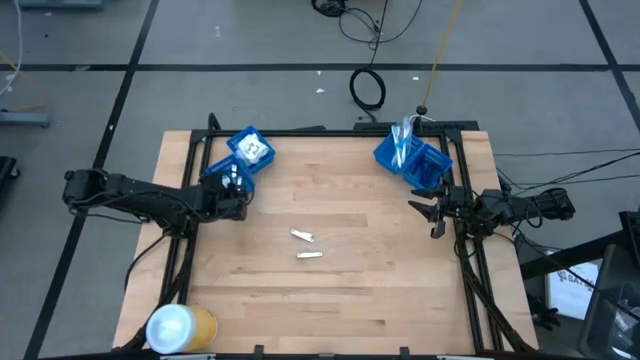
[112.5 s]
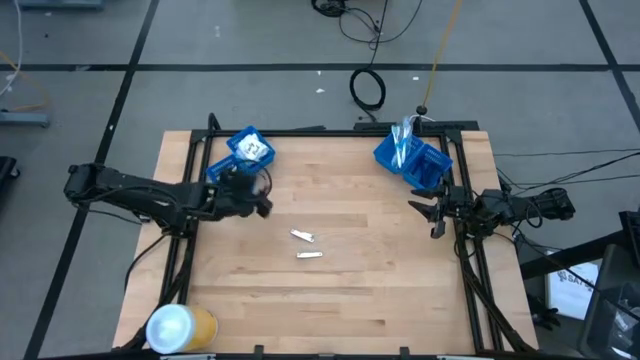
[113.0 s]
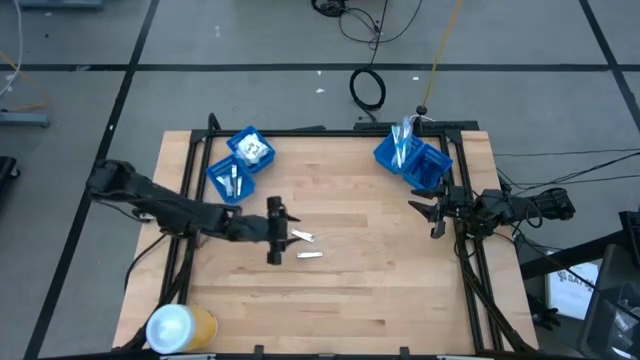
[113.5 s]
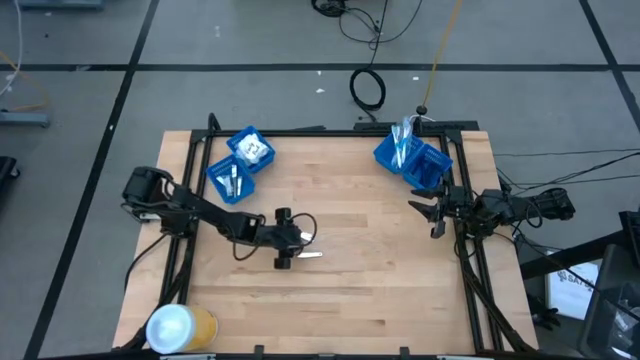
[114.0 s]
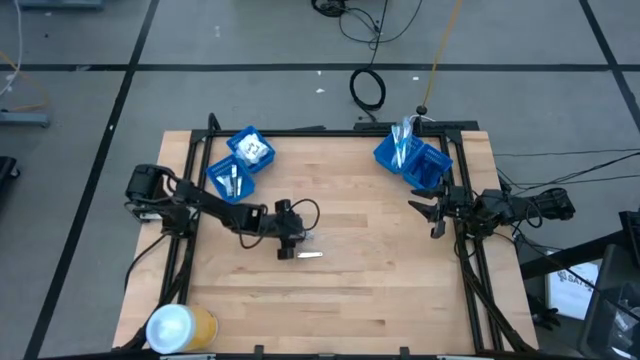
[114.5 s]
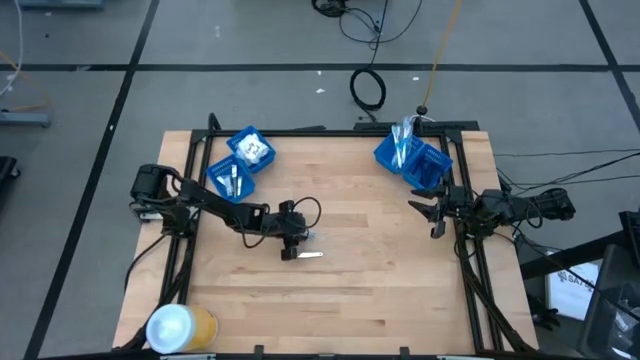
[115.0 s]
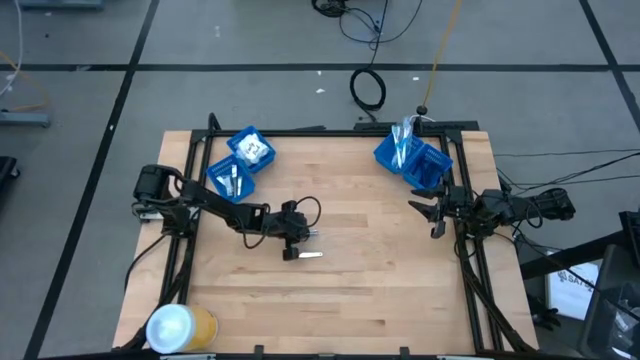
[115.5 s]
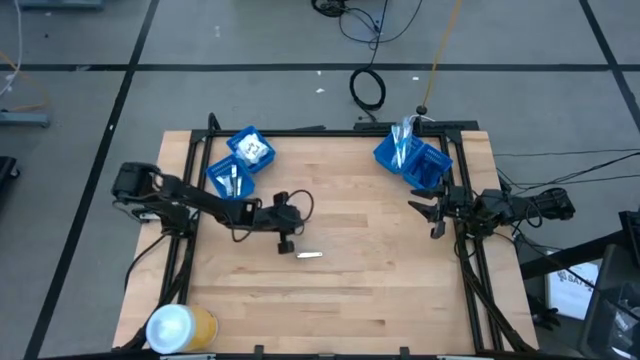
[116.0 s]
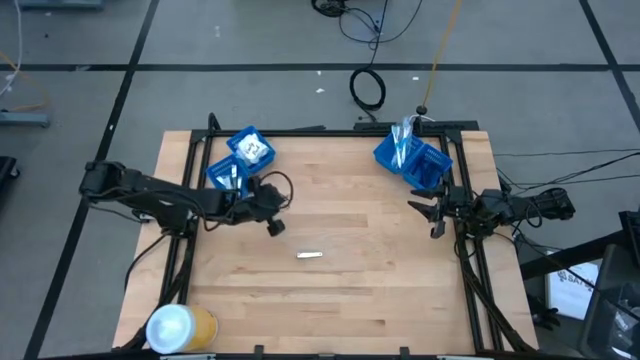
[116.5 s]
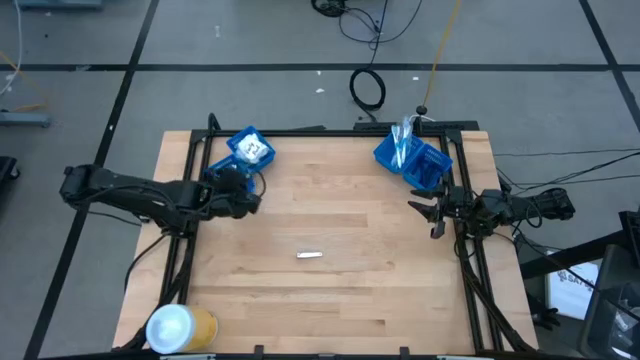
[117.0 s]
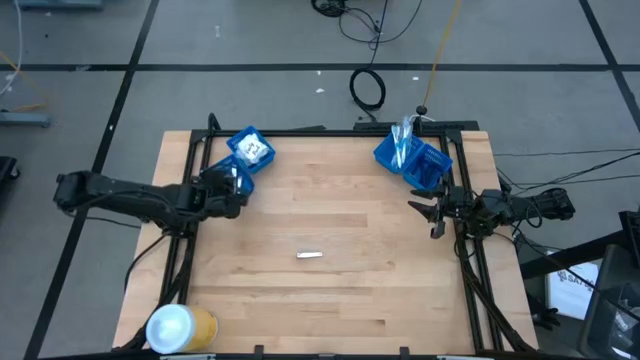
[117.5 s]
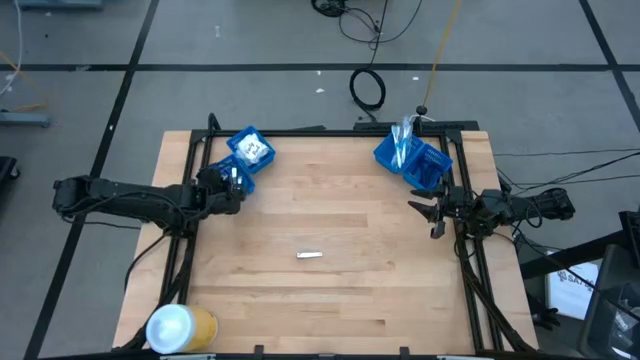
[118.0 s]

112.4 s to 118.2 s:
Task: Pick & Place Travel size toiletries
Put the silver nail cutter into the left blue basket

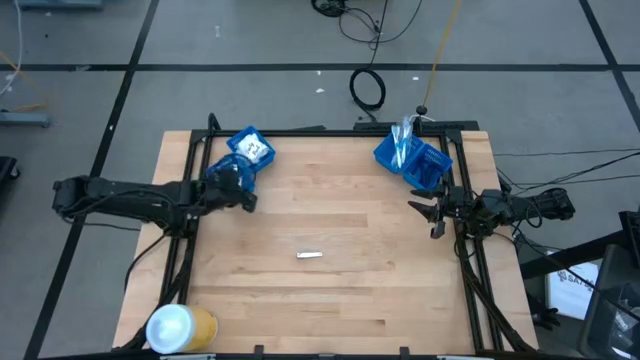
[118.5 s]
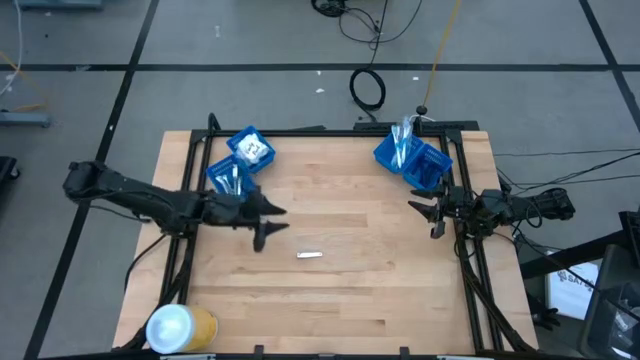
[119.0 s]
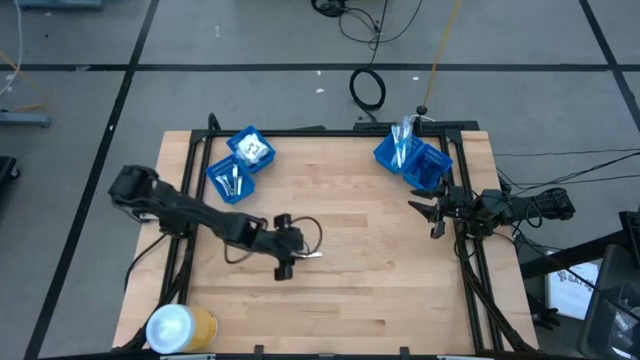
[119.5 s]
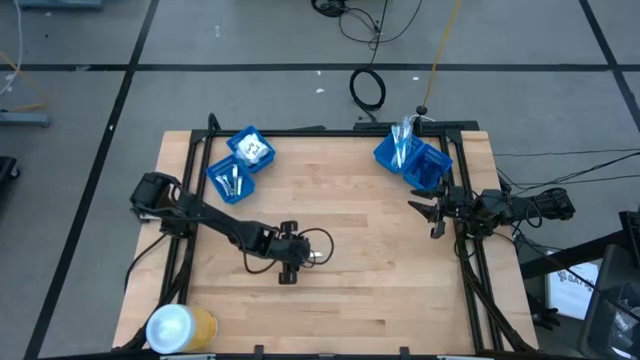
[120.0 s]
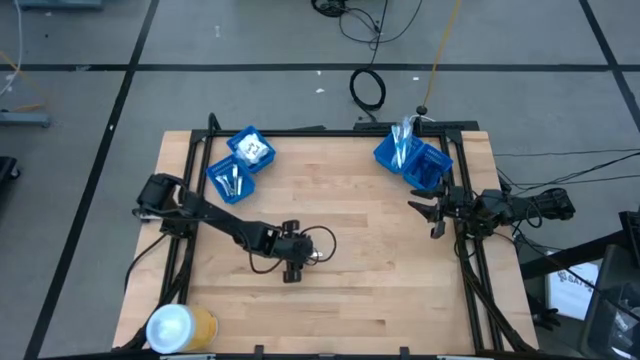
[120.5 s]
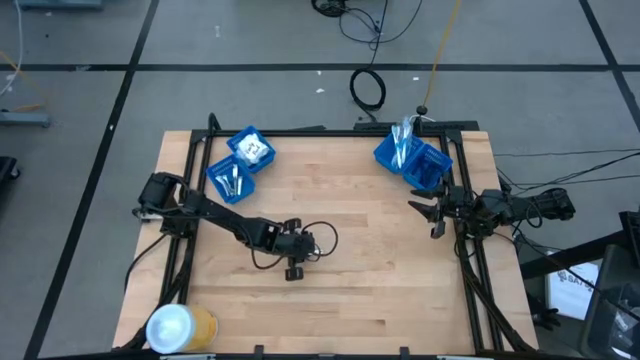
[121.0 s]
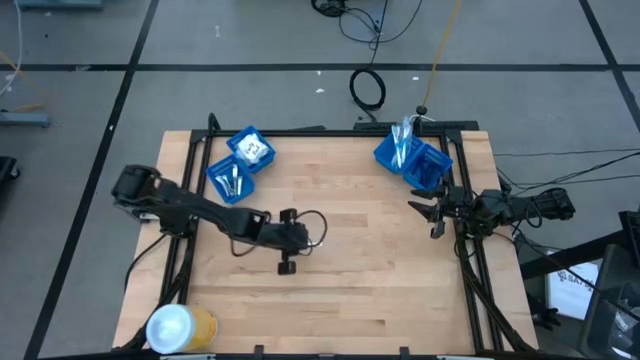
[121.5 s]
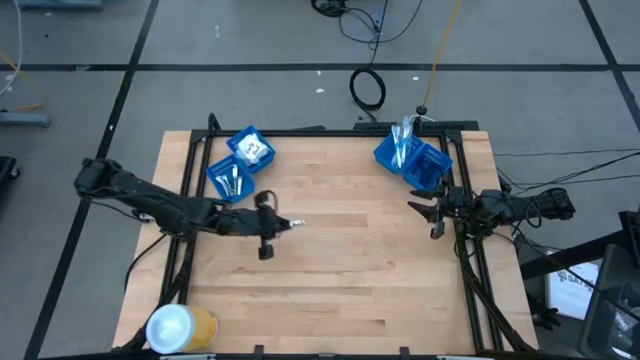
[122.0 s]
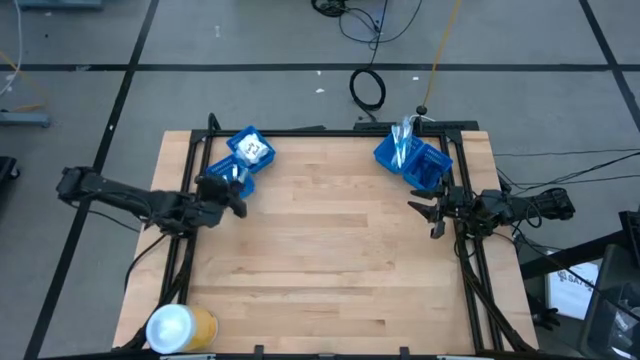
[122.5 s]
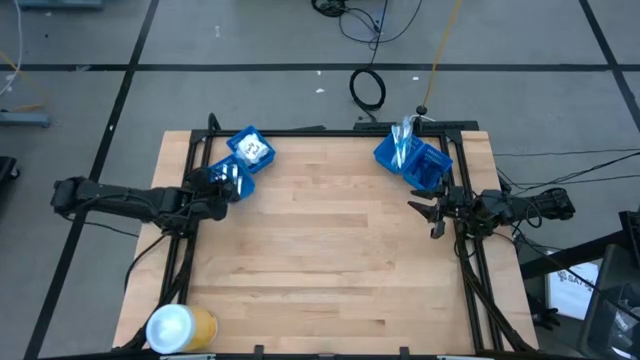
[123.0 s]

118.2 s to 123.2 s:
Put the silver nail cutter into the left blue basket

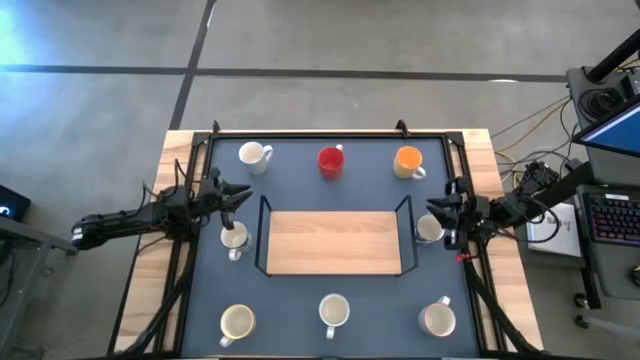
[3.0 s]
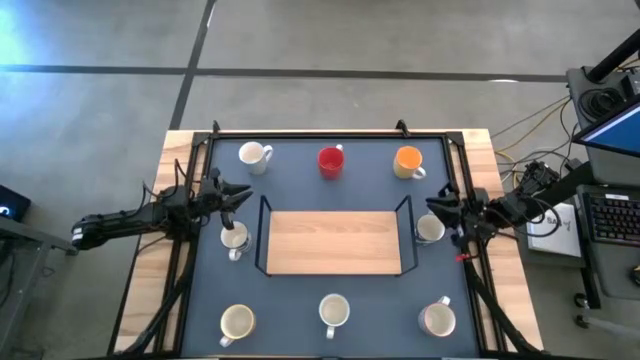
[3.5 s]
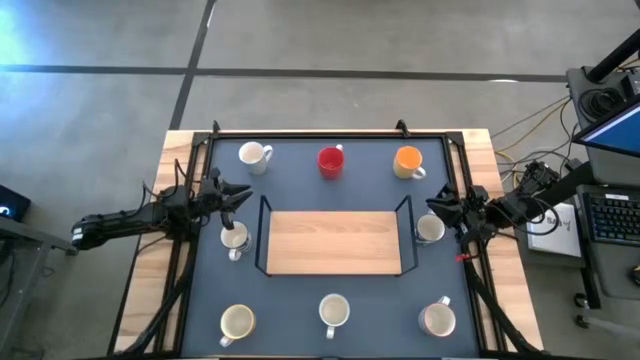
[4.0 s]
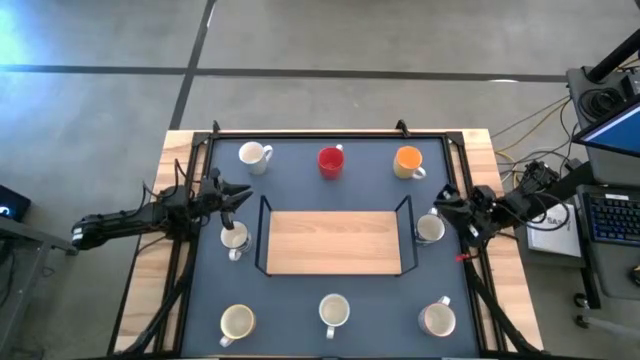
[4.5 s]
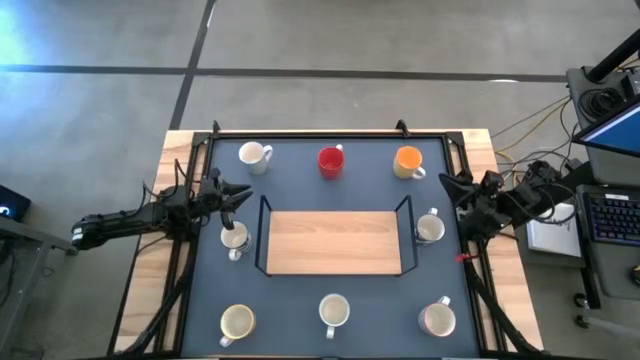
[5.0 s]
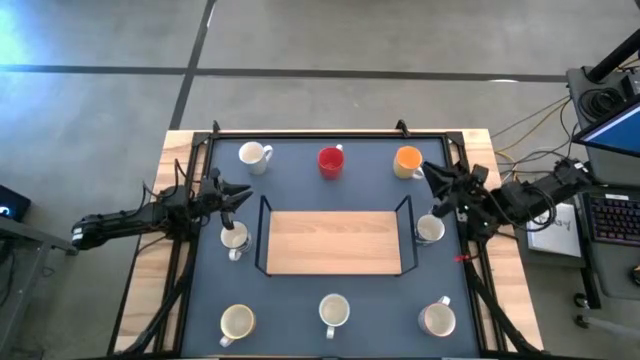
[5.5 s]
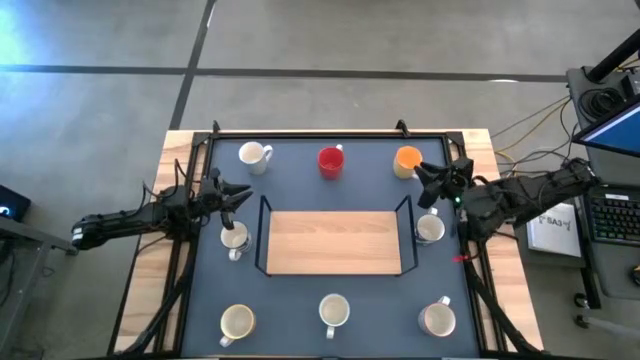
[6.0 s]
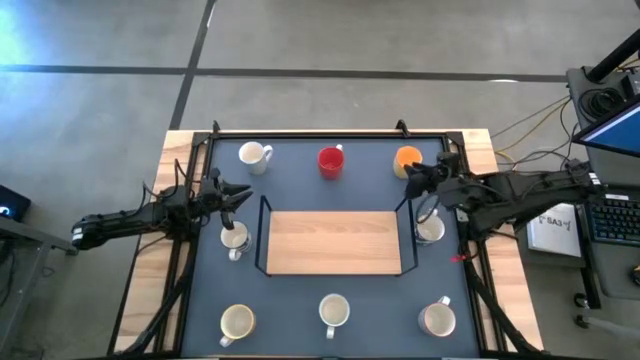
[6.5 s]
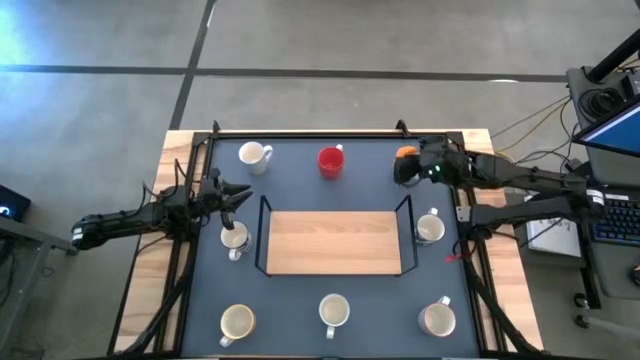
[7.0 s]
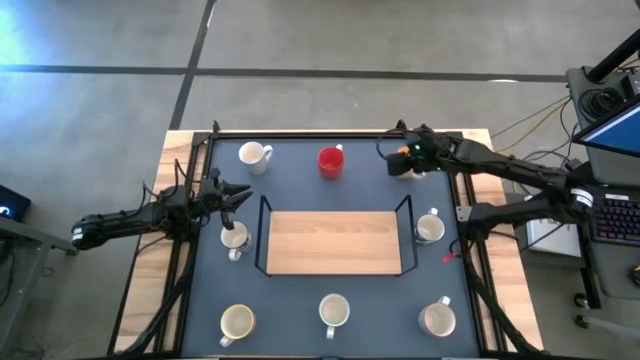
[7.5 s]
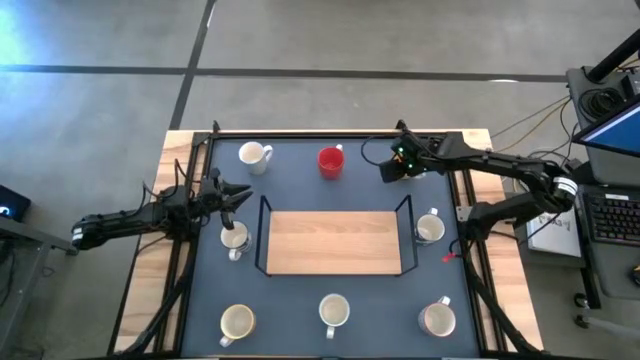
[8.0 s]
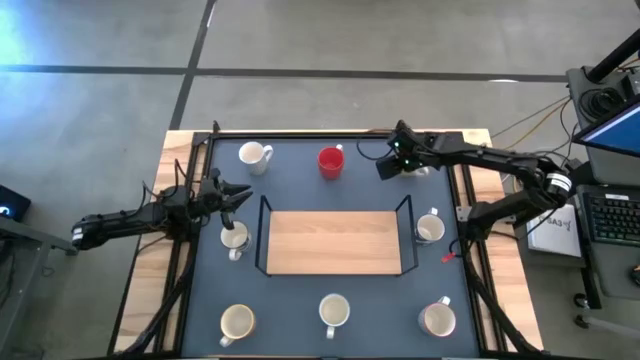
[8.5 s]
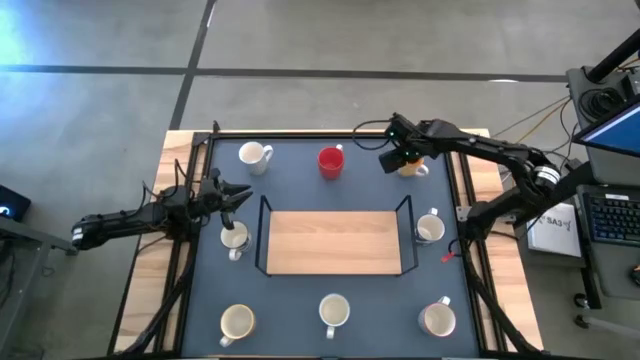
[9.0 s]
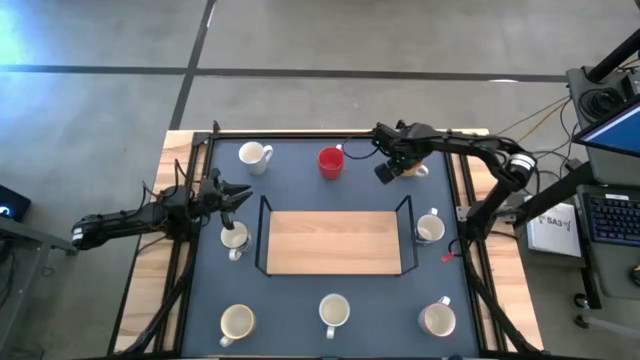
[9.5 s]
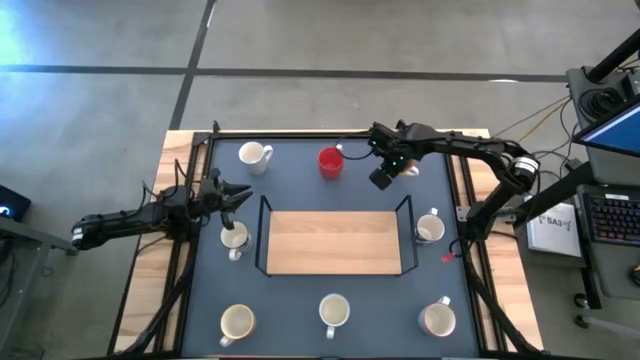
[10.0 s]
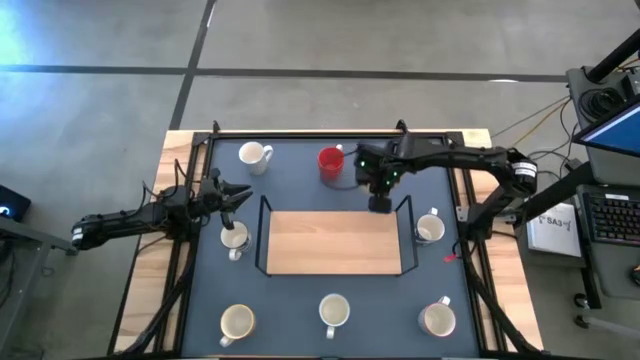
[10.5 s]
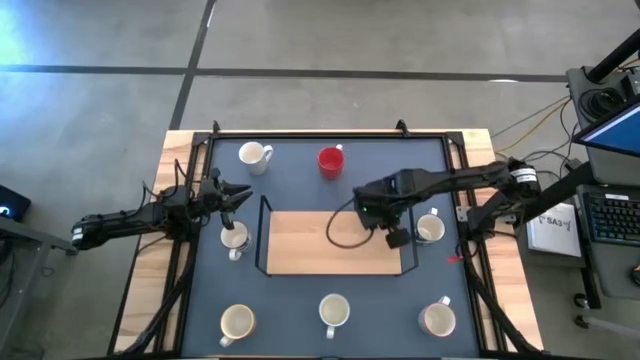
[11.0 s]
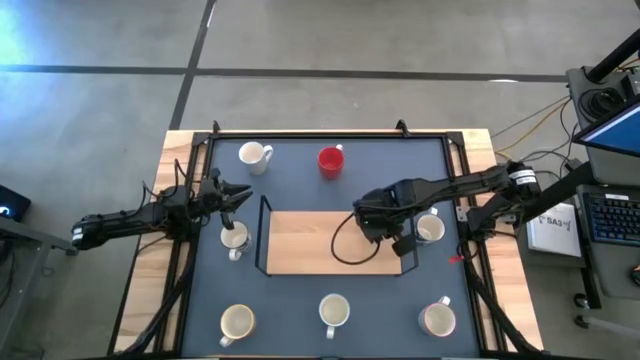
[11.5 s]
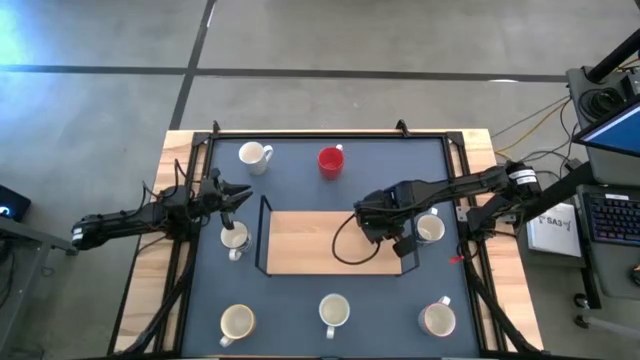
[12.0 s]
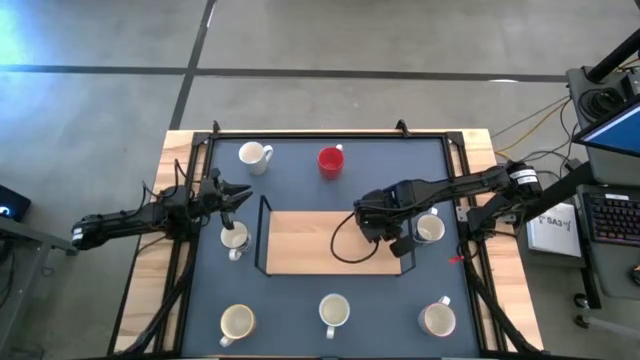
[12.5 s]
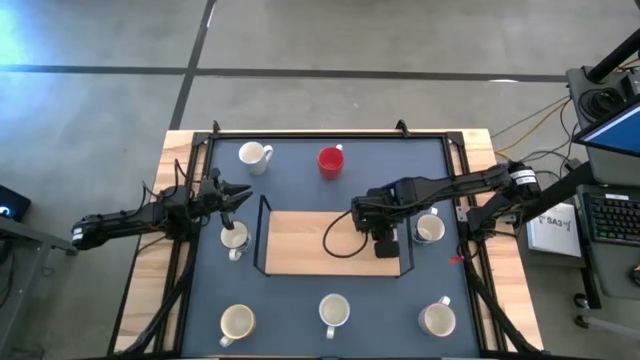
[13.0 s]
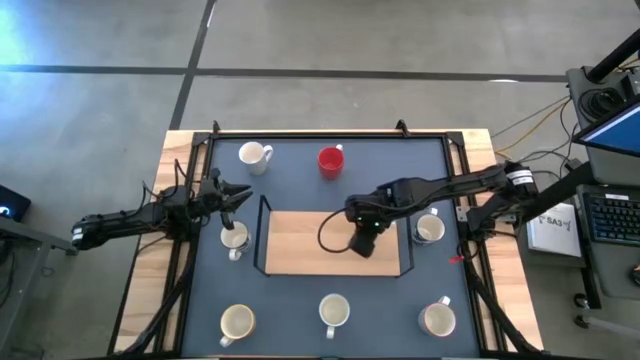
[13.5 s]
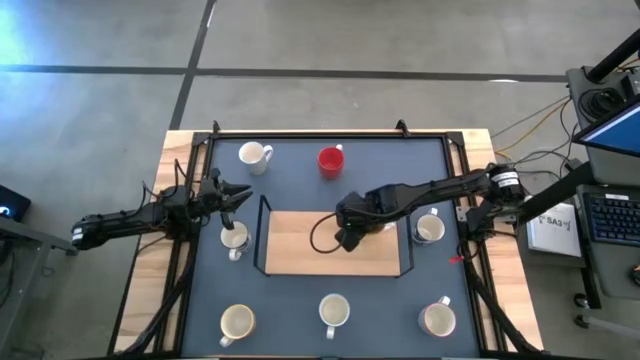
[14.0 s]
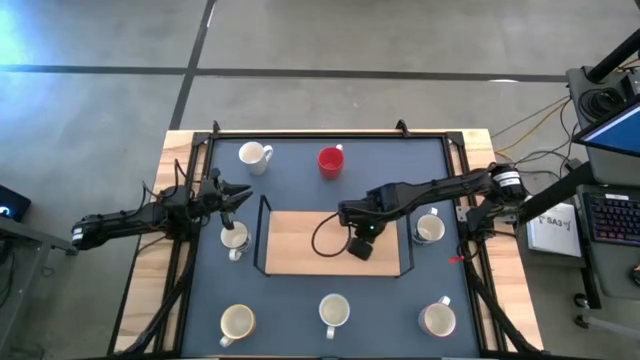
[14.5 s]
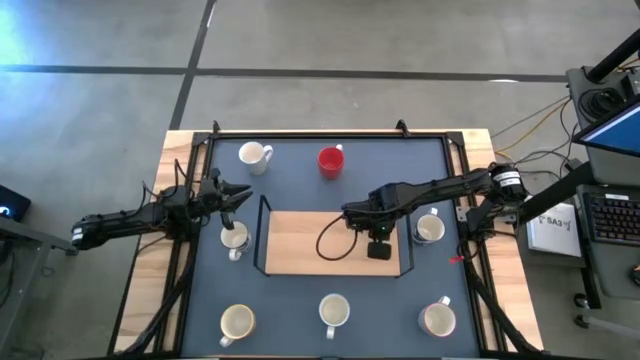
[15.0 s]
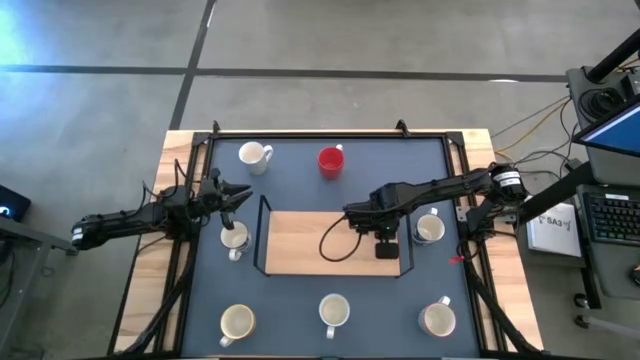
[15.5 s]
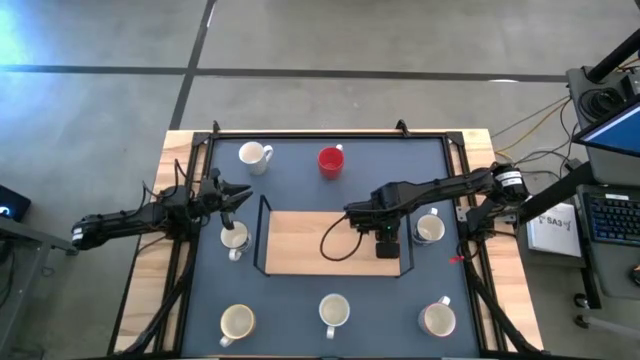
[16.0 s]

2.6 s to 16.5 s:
Task: Place coffee mugs
Put the yellow cup on the shelf
